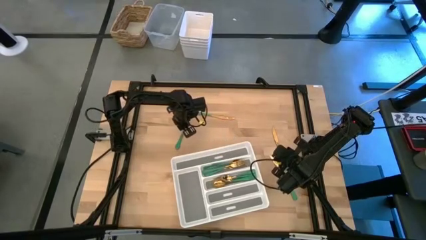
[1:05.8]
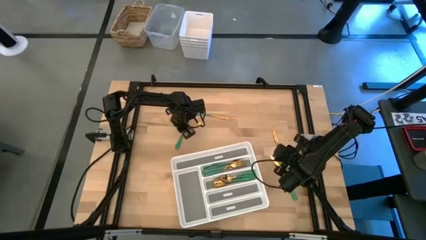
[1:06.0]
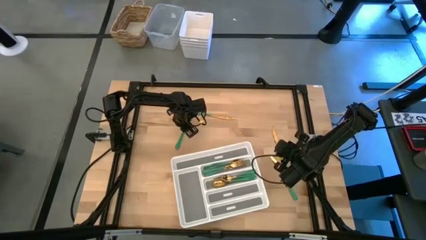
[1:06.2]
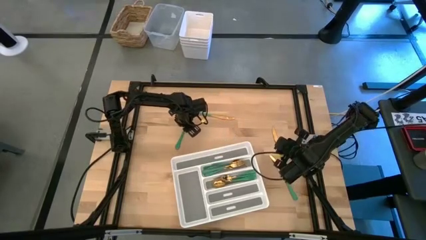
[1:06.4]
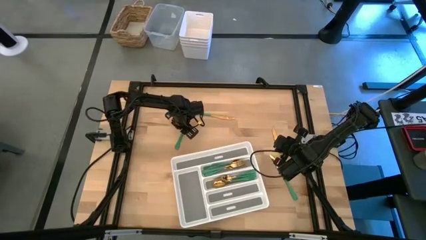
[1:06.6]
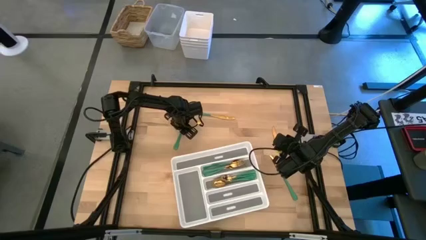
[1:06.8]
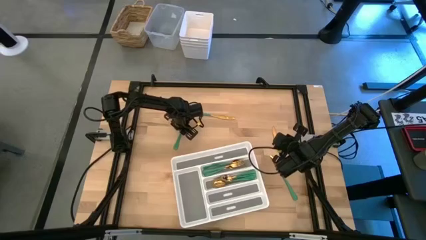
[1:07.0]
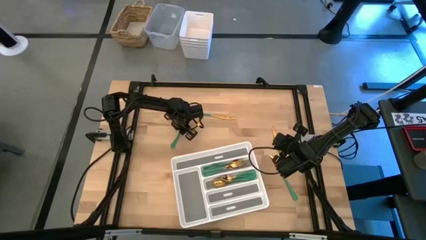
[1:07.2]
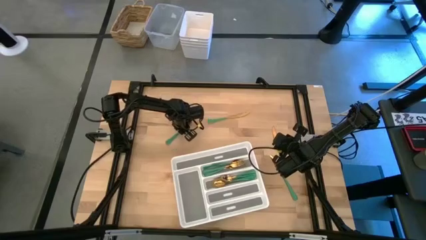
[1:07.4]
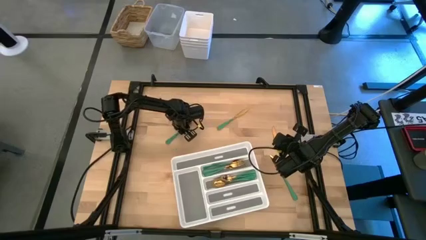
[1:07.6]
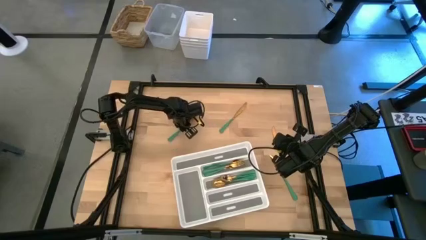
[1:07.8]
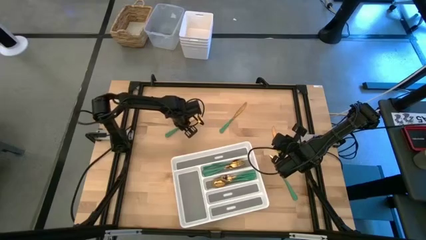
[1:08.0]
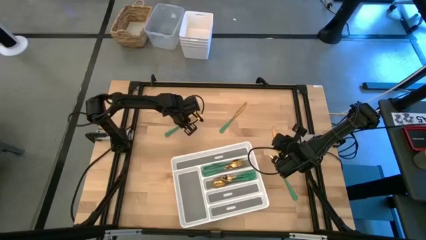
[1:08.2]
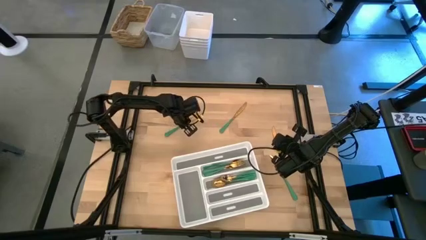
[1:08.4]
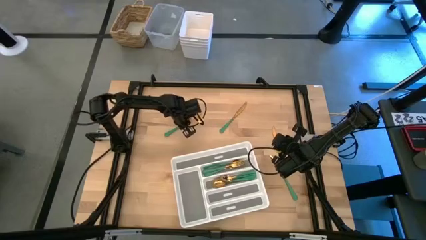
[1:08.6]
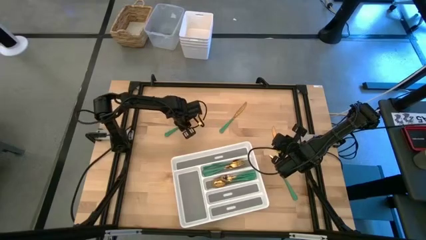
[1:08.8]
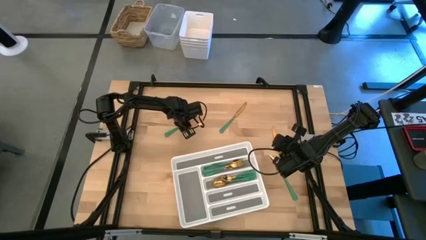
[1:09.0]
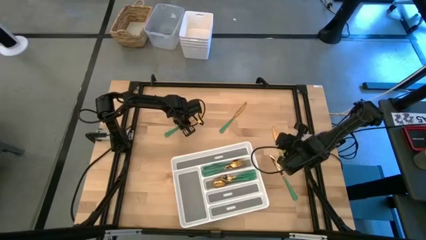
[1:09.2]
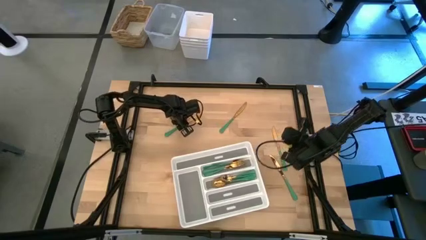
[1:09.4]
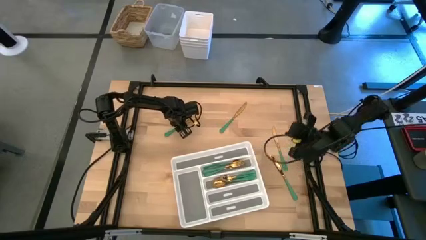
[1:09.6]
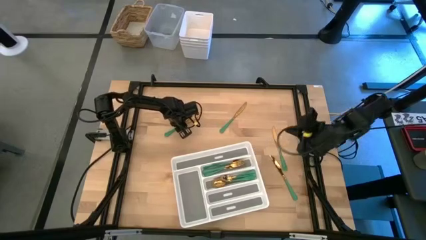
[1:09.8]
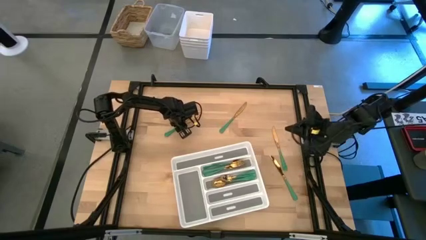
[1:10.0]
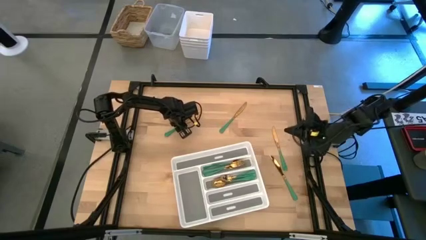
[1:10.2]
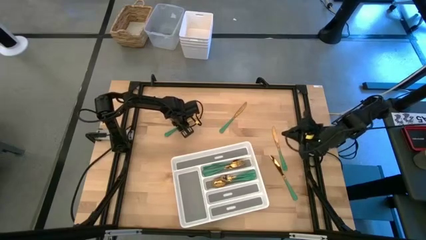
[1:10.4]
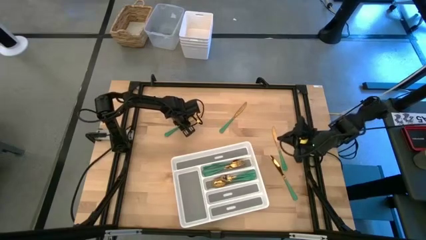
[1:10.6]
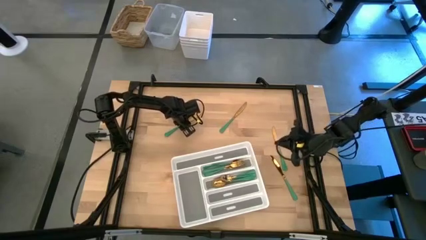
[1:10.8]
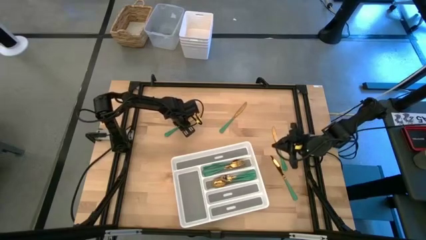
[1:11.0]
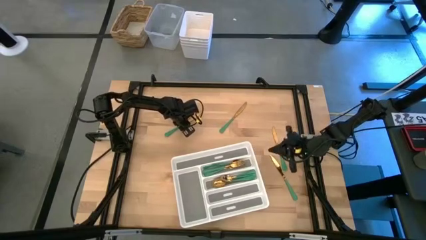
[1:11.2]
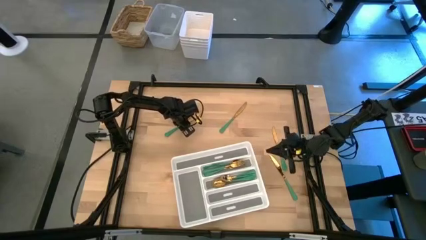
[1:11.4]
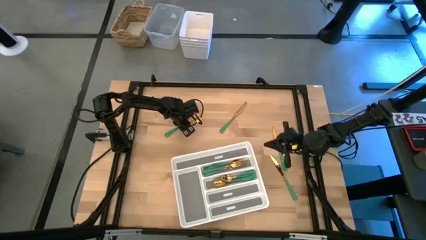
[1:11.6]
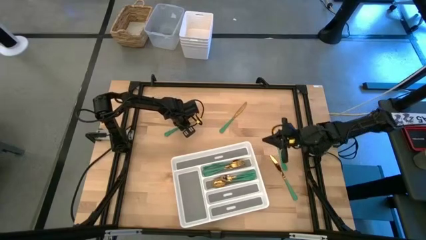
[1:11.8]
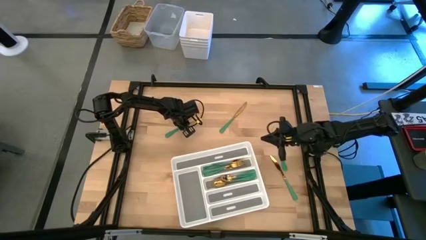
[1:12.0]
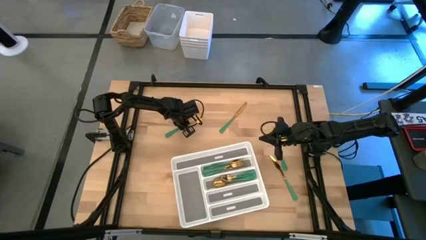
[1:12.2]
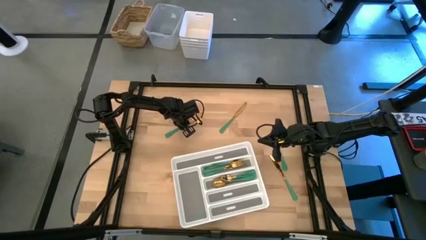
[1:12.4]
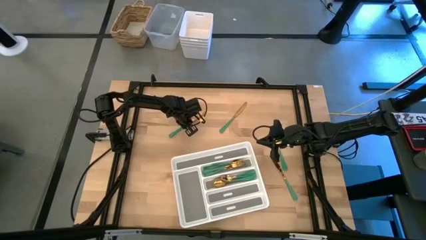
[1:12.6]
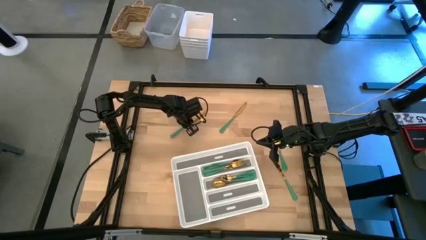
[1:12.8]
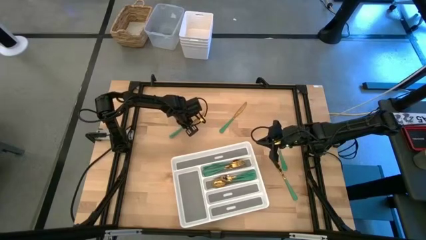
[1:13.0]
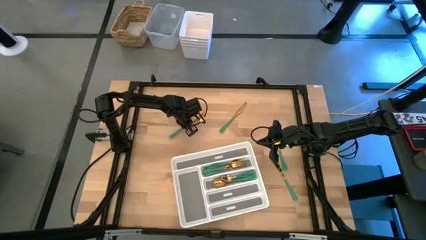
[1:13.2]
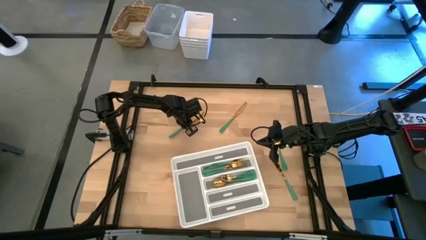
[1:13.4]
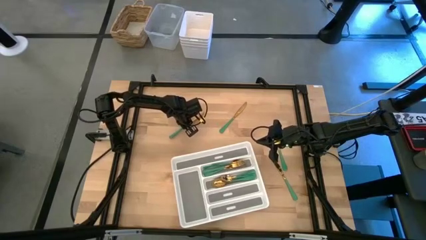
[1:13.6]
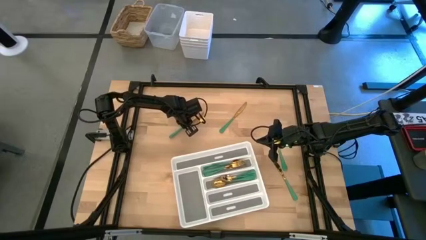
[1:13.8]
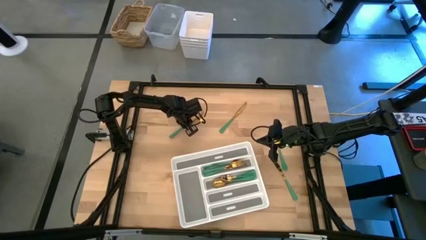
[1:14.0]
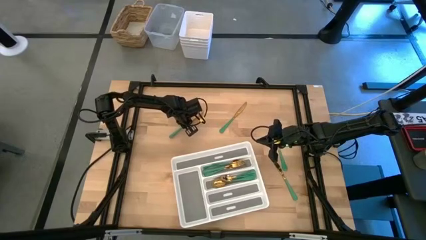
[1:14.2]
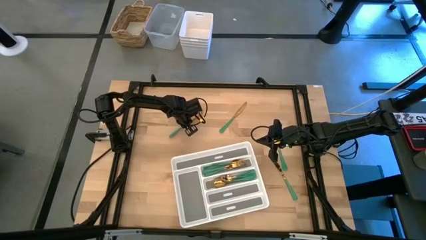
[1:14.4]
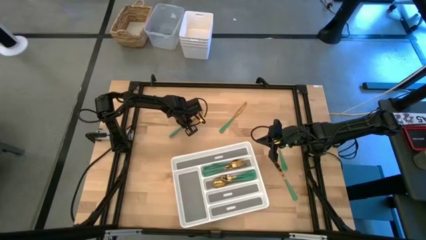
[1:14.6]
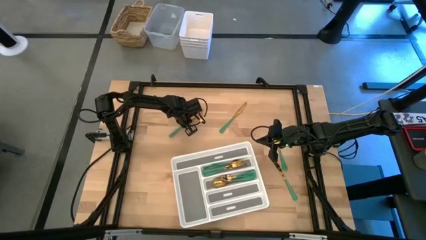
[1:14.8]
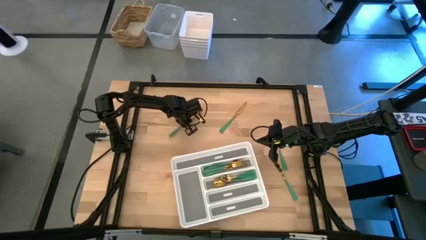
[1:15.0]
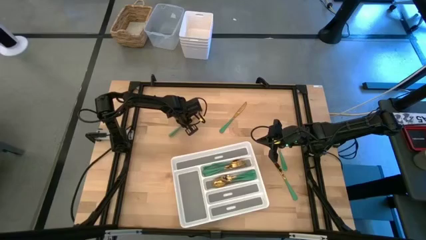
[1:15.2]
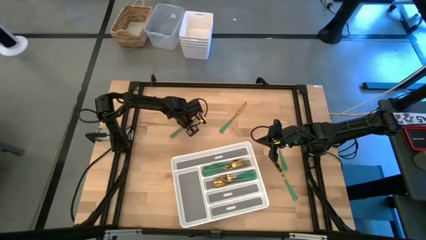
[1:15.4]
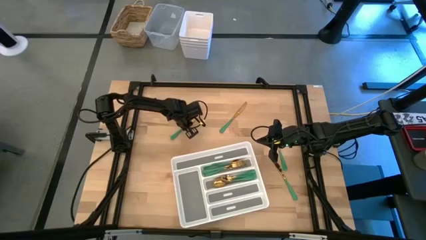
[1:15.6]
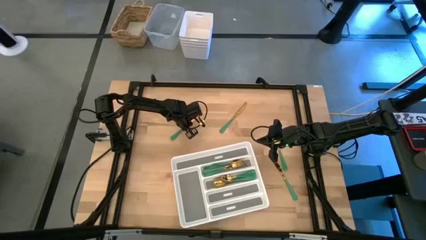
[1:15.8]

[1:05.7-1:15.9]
Task: Sort silverware
Put the green knife into the white silverware tray

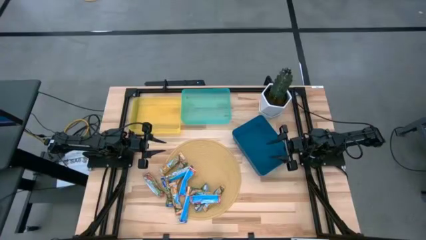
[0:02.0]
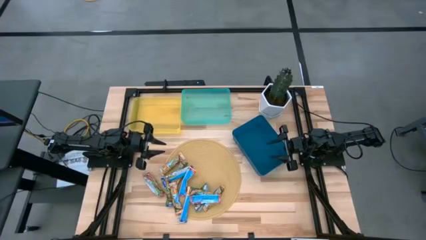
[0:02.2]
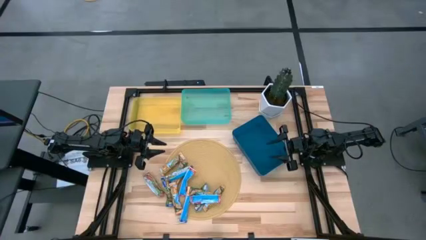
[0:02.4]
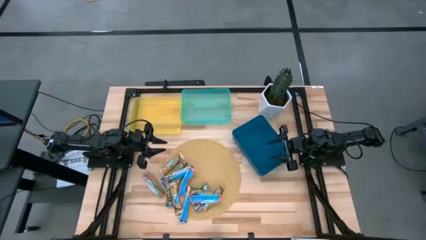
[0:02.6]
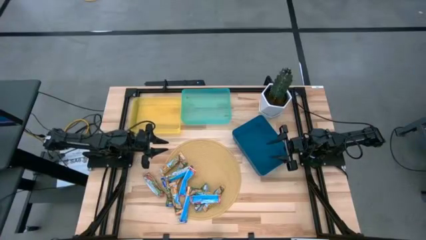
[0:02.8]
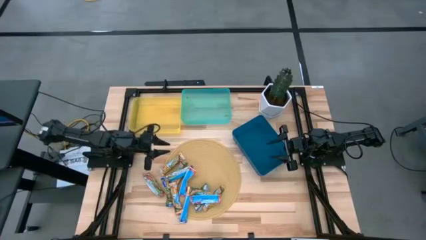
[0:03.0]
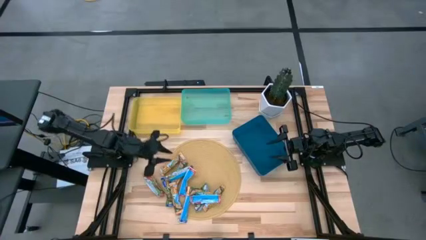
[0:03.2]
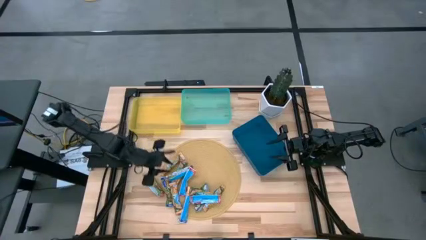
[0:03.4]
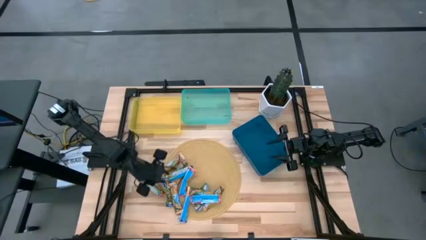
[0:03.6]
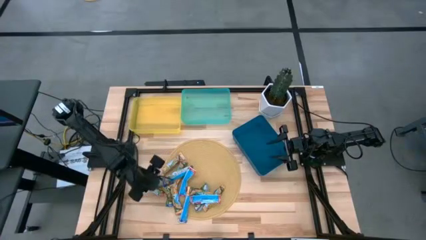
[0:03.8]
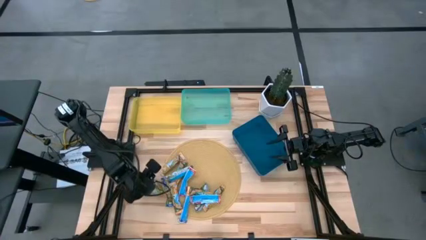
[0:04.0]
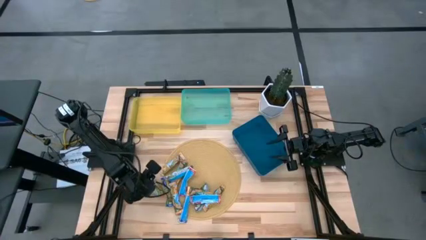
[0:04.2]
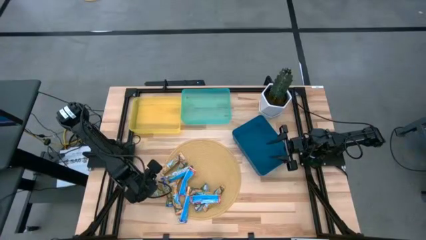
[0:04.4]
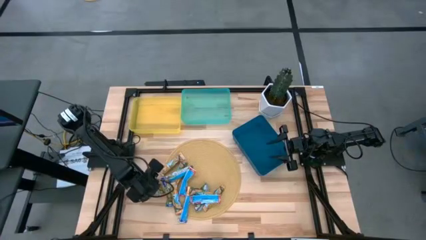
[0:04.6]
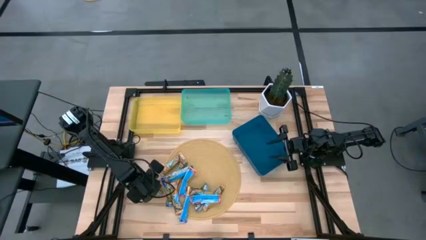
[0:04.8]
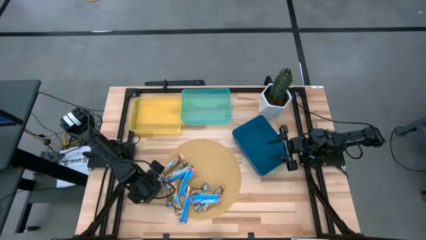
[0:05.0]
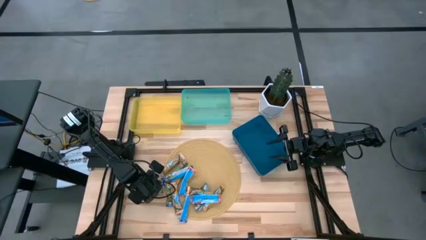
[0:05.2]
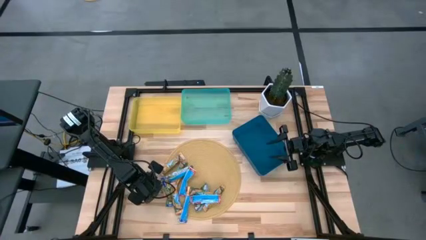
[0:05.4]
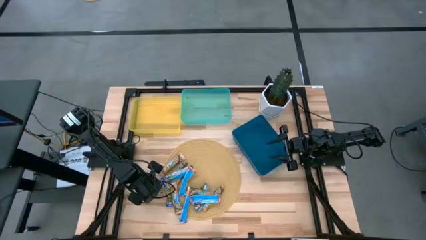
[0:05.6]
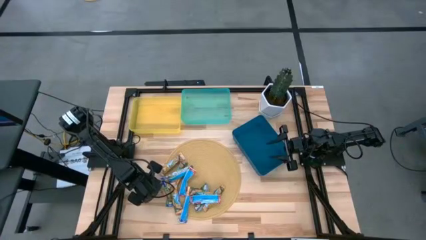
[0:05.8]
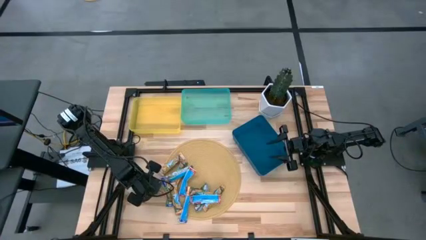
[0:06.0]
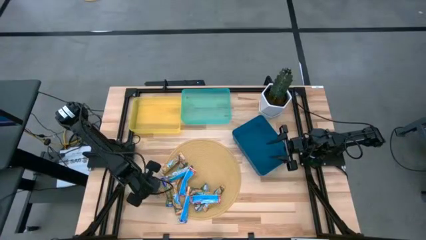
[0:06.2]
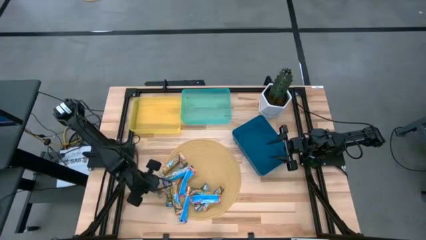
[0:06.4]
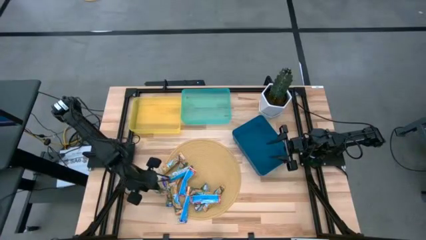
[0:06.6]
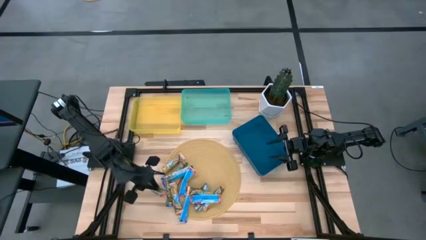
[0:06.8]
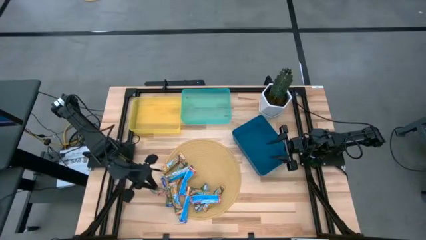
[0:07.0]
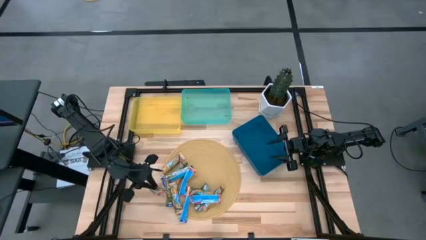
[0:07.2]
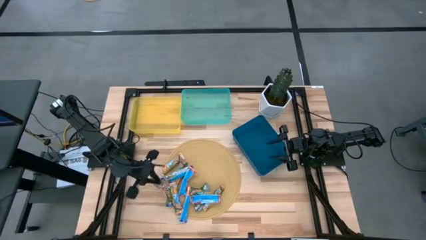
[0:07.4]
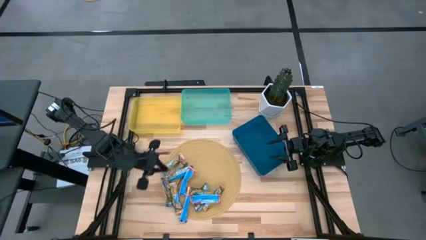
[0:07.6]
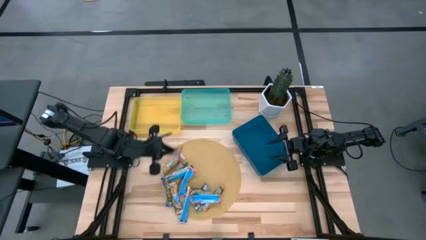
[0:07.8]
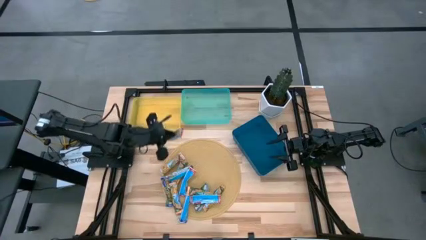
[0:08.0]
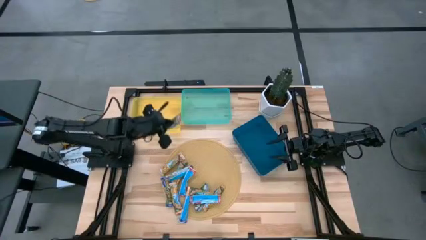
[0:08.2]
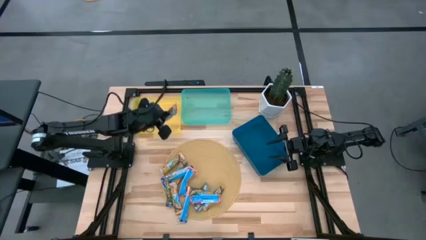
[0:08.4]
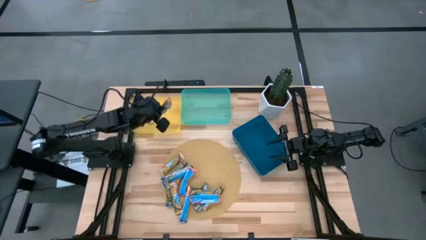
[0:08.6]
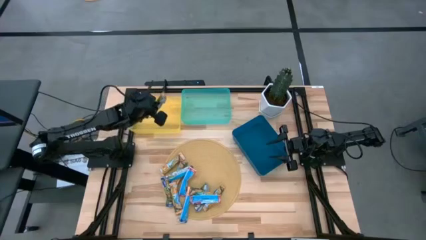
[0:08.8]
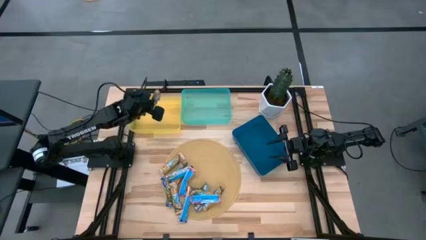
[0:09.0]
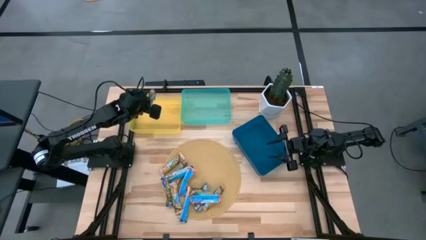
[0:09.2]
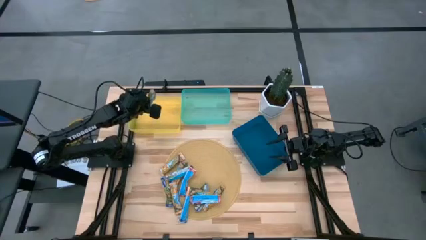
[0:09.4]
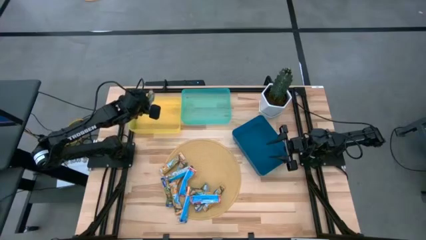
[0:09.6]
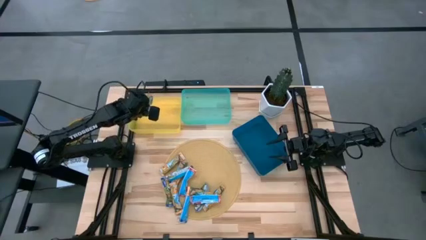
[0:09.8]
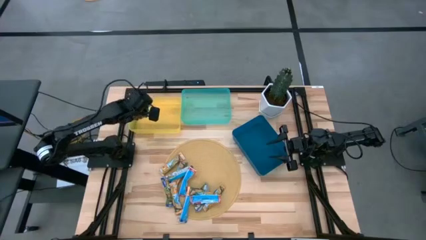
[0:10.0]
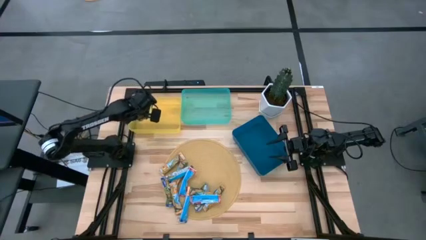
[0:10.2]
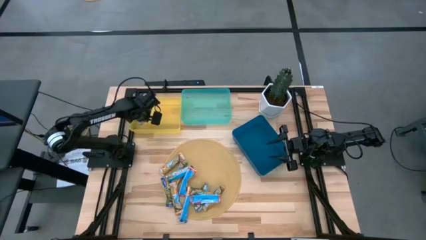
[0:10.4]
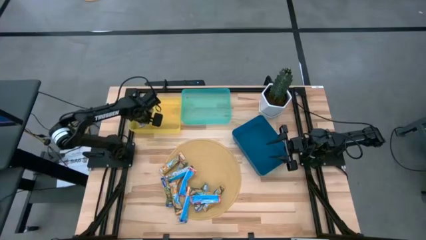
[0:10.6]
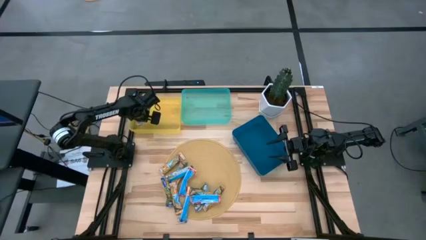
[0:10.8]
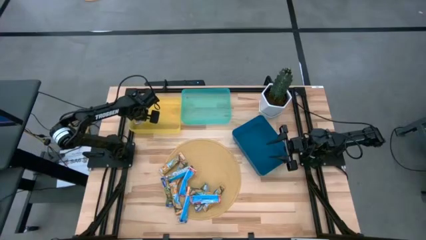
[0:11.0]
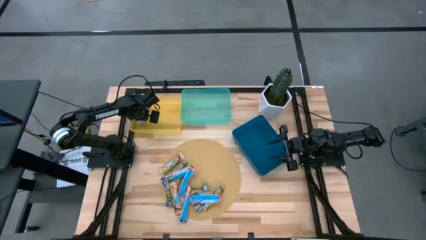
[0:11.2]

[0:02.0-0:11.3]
Task: Pick and place Granola Bars by type
Put the red granola bar into the yellow bin
